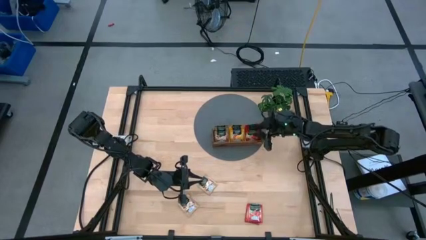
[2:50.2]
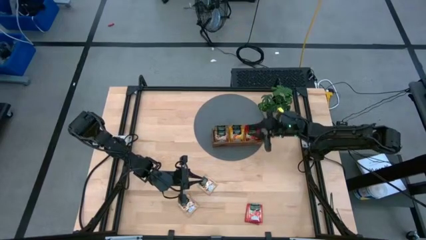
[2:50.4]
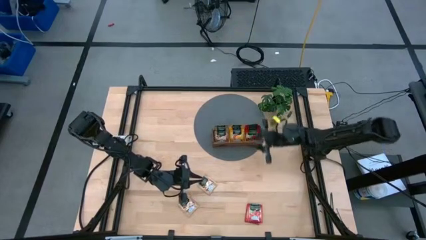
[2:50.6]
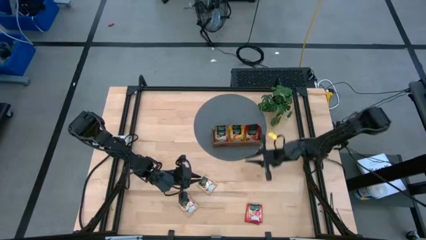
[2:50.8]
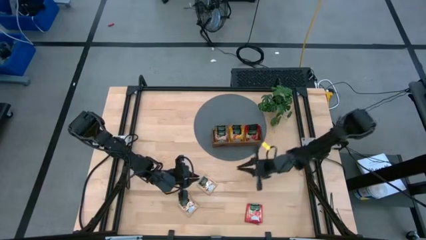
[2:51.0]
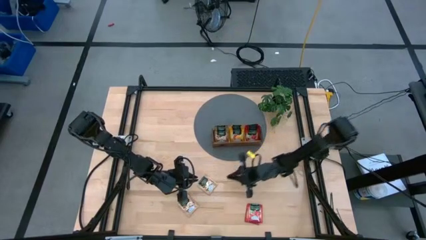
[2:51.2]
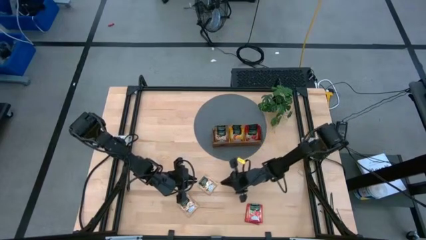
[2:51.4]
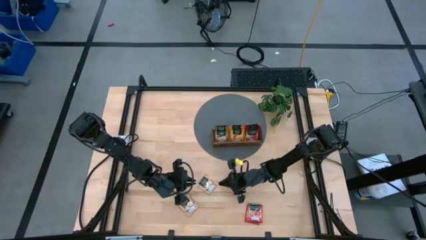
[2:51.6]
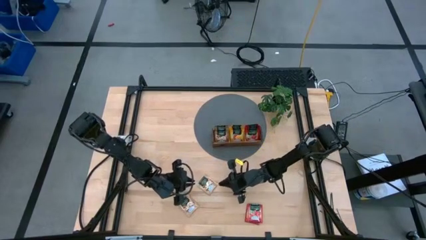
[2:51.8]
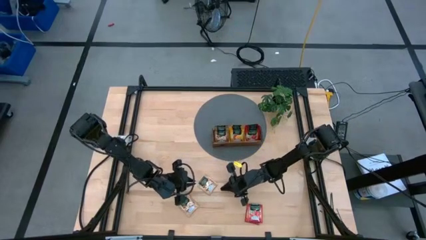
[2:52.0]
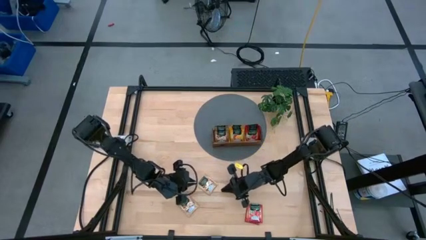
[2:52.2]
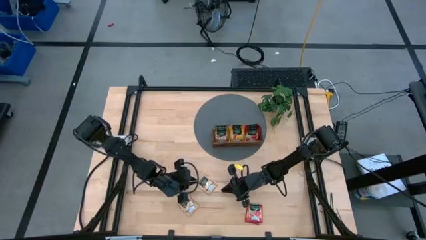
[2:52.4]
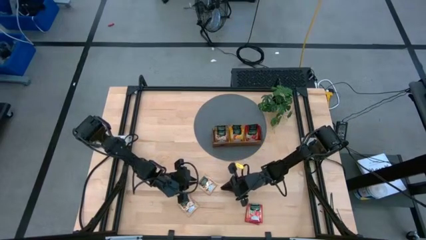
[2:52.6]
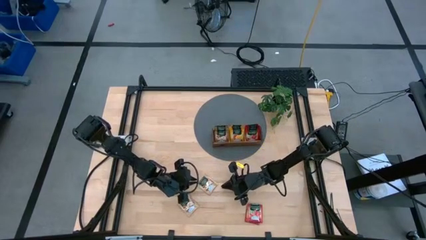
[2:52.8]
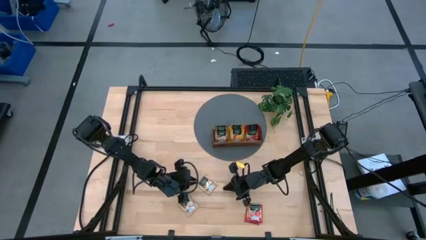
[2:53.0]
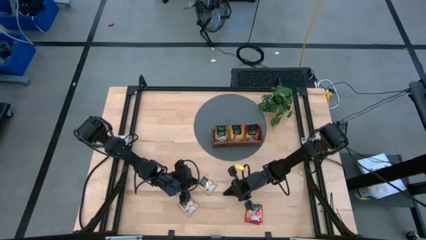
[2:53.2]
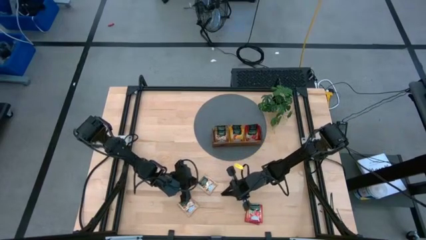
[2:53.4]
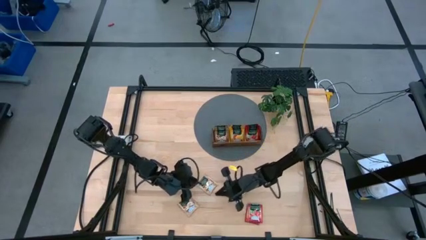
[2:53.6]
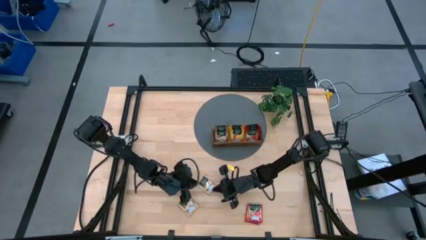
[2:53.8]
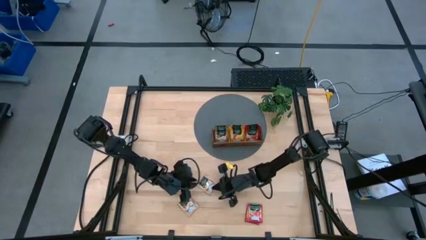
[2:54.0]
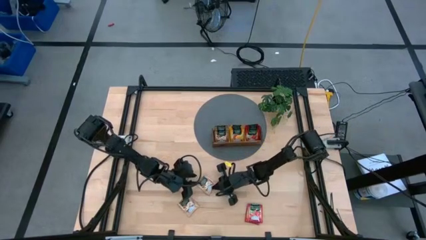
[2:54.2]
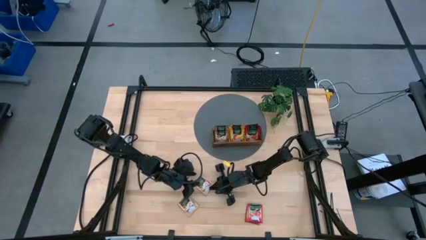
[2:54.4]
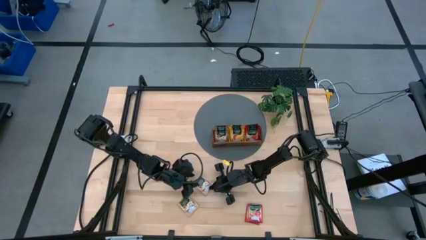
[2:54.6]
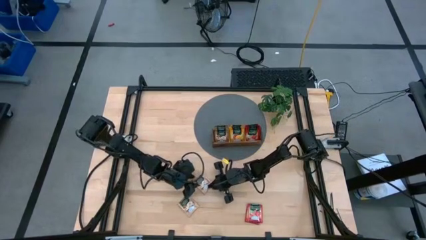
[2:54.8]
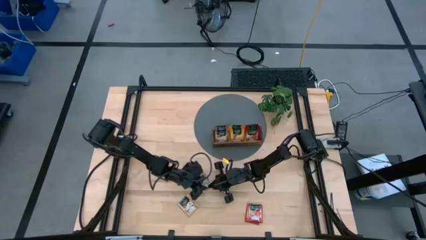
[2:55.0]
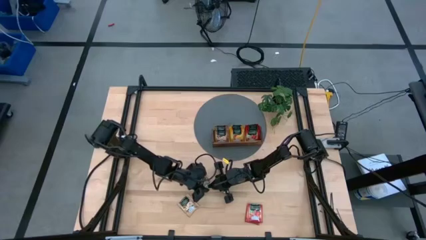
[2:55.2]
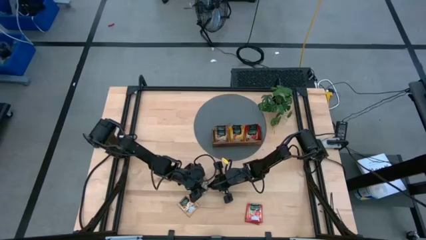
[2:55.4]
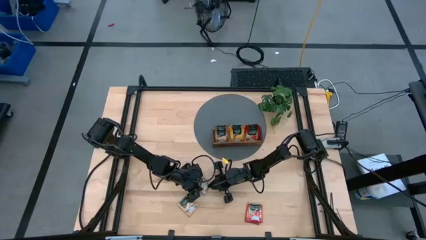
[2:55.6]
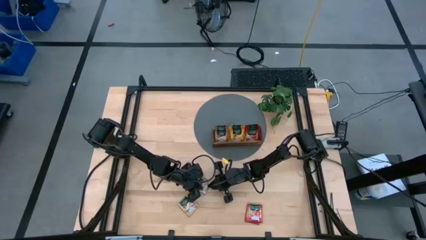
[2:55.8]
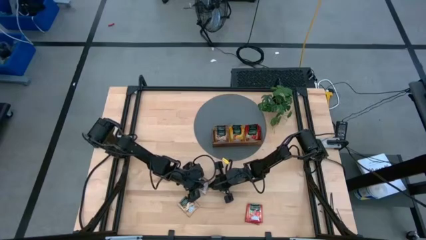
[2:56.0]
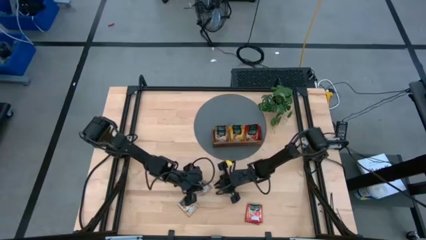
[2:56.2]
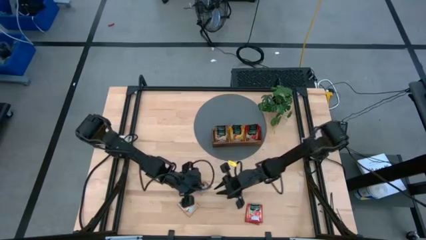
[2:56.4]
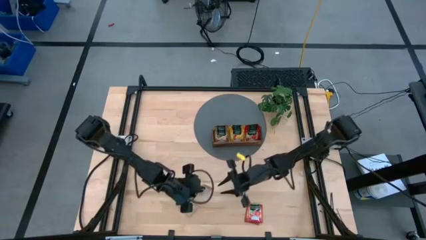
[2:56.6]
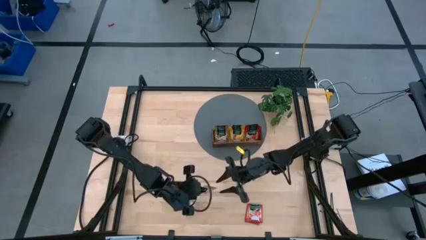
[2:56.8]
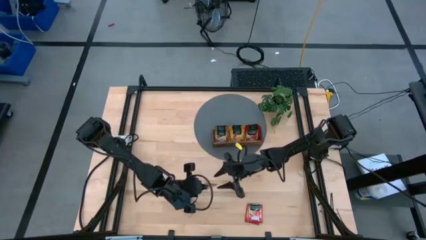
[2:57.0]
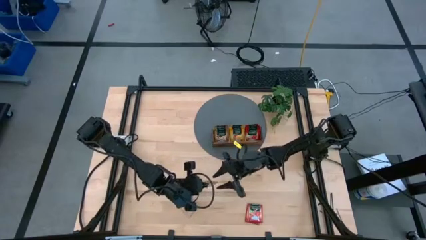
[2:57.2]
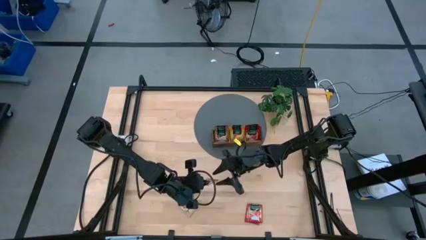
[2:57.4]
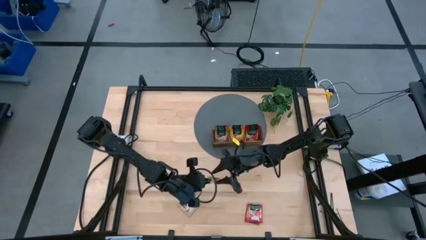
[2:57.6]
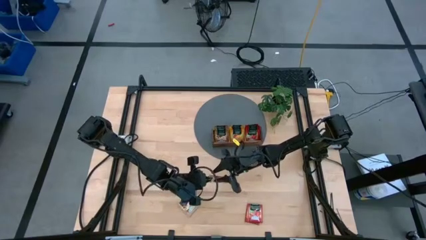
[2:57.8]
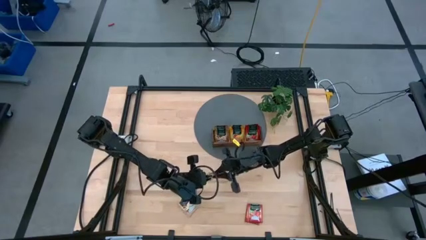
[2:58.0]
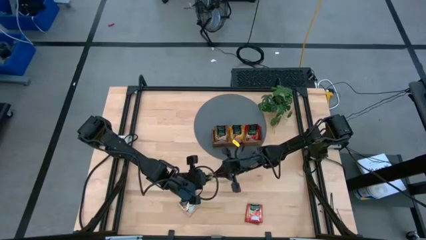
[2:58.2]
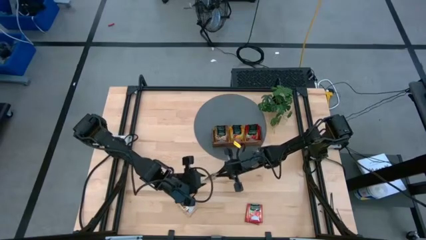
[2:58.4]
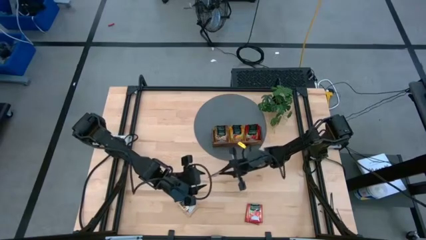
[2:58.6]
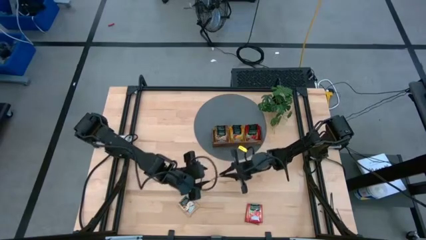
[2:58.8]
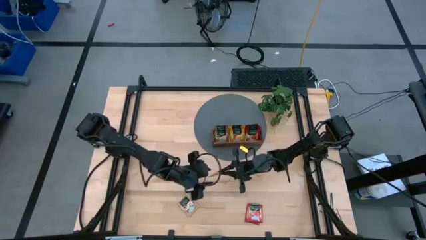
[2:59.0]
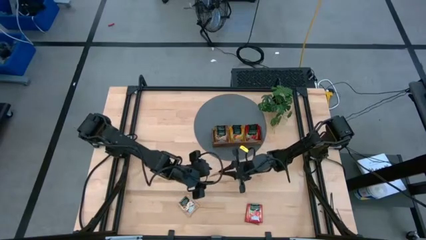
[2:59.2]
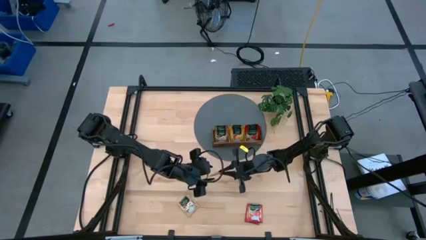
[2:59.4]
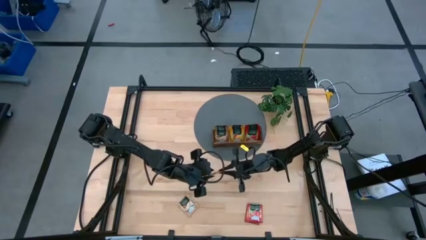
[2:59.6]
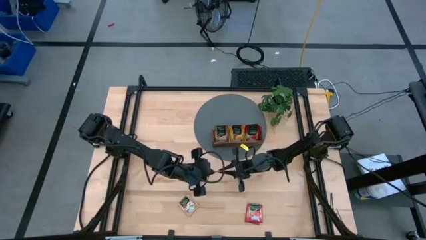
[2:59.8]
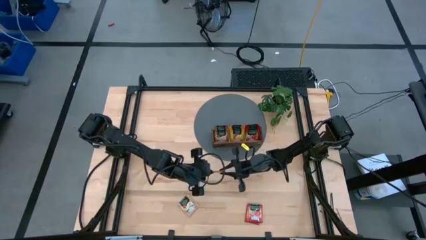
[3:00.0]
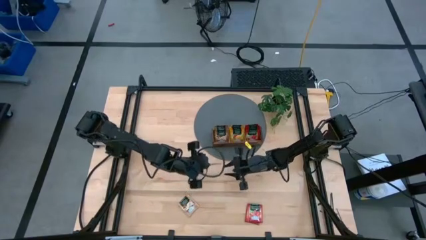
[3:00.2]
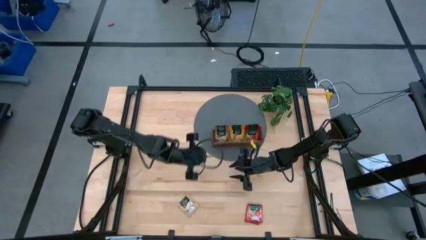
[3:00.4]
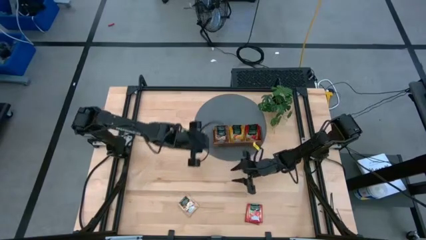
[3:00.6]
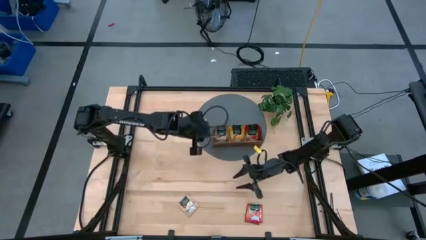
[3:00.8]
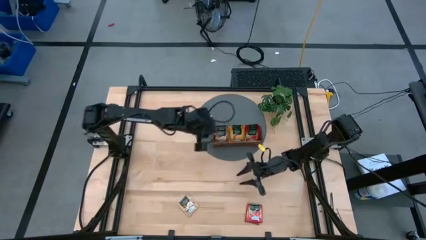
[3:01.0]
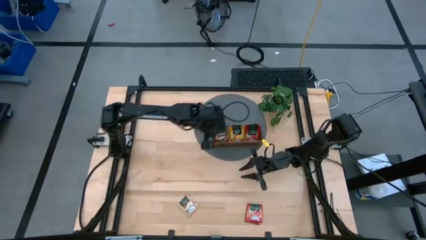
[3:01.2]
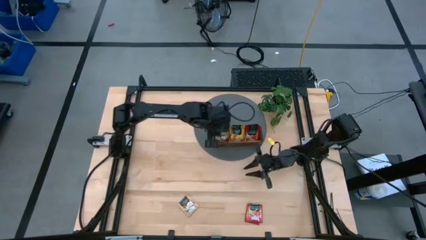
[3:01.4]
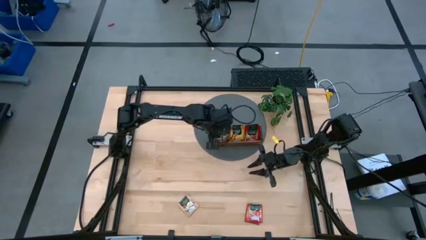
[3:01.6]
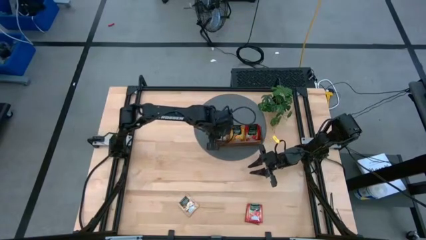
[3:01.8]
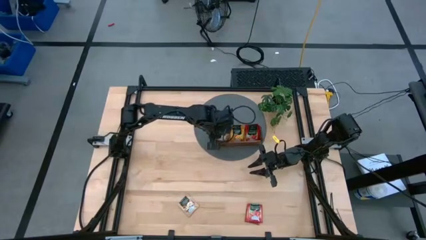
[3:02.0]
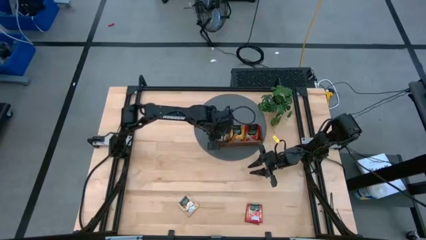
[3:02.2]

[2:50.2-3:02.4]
Task: Pick & Place Tea
Put the top brown tea packet into the left section of the wooden organizer
